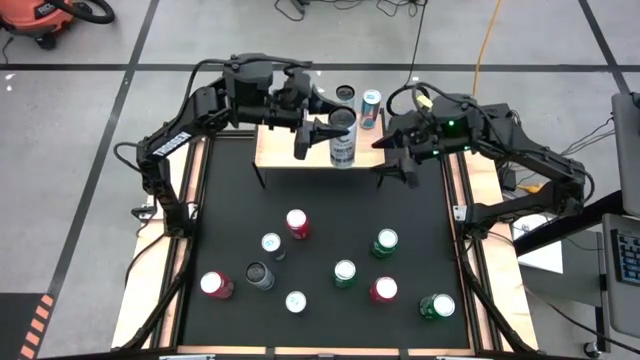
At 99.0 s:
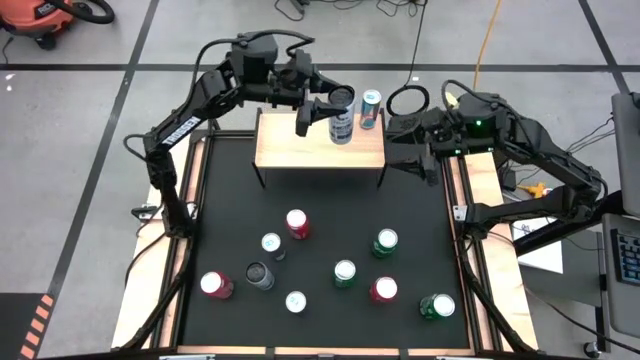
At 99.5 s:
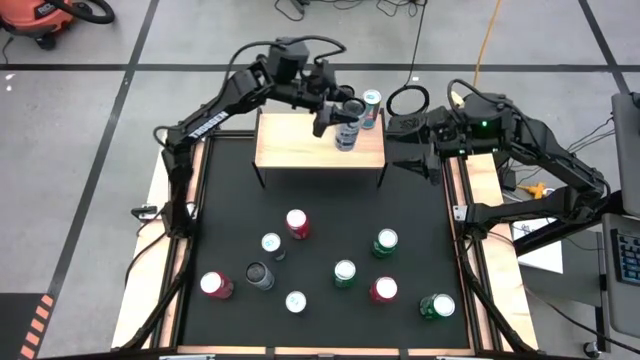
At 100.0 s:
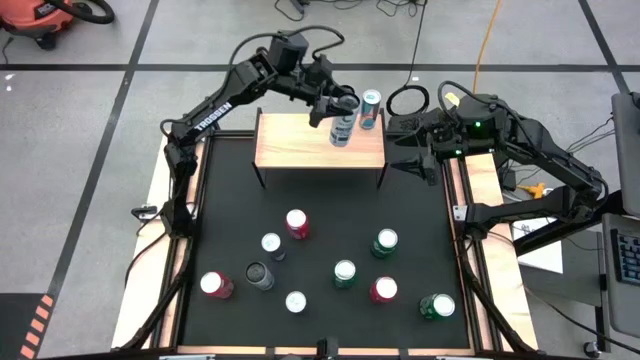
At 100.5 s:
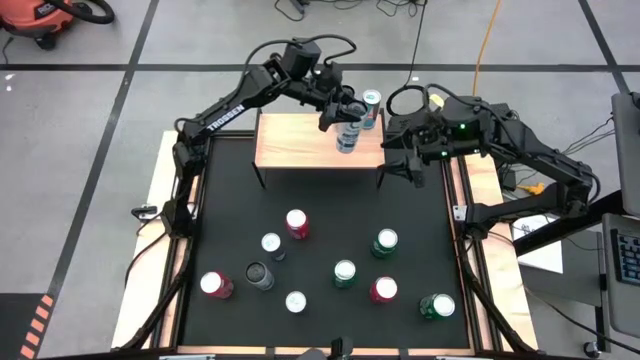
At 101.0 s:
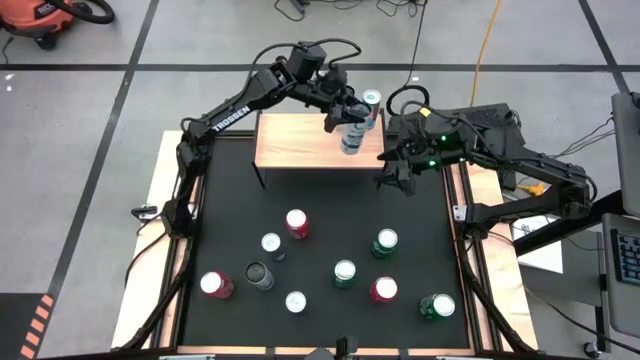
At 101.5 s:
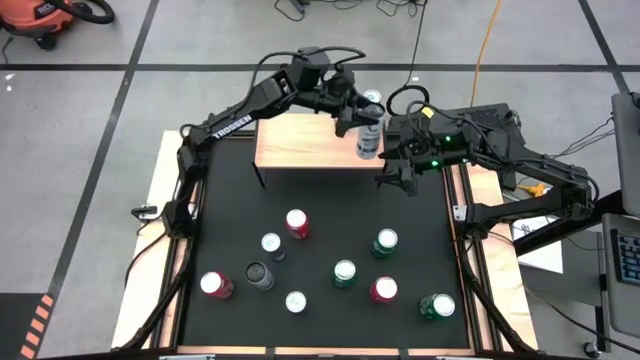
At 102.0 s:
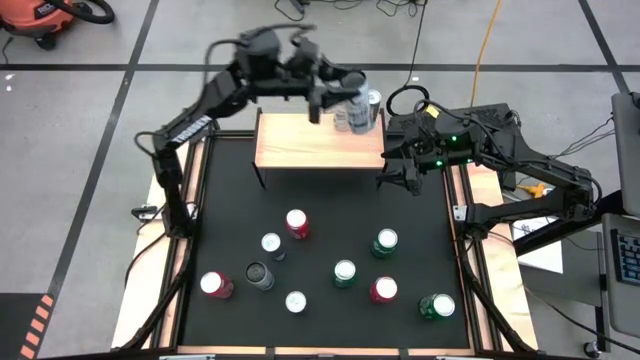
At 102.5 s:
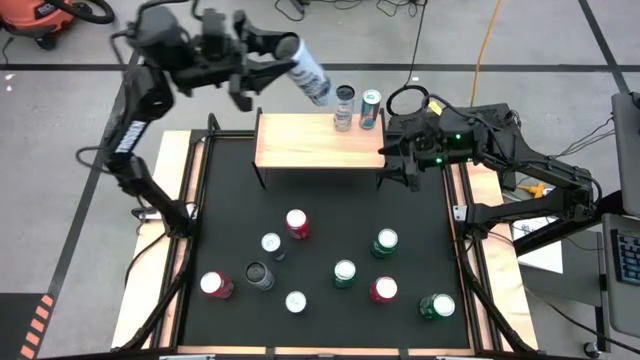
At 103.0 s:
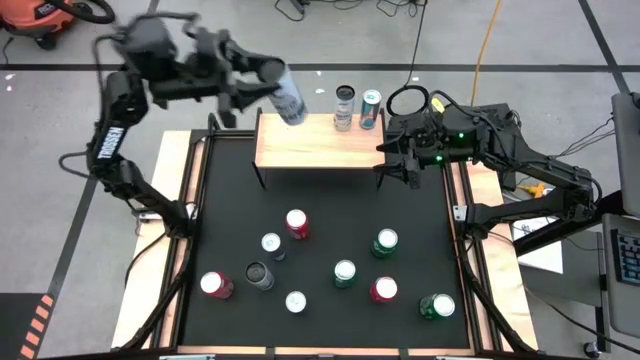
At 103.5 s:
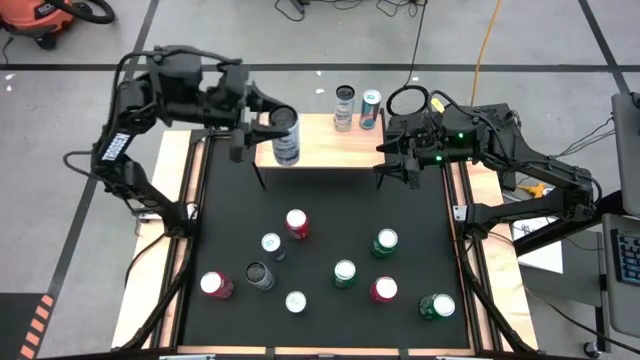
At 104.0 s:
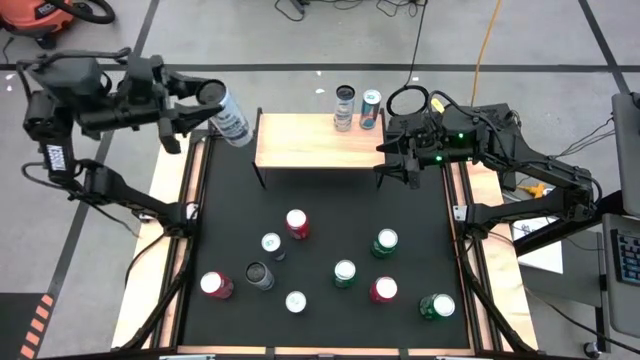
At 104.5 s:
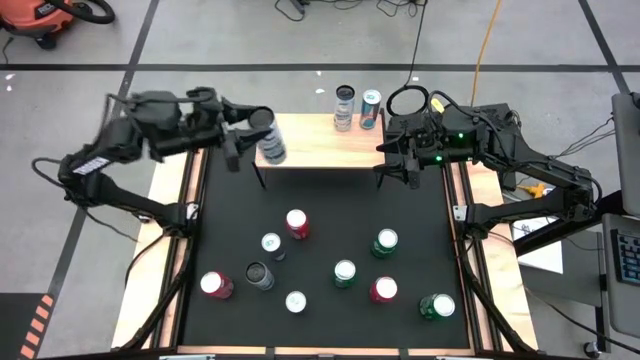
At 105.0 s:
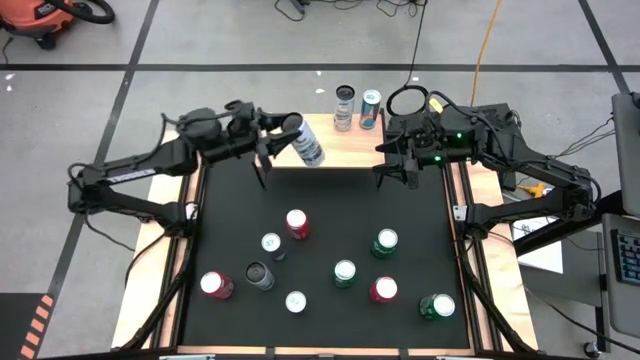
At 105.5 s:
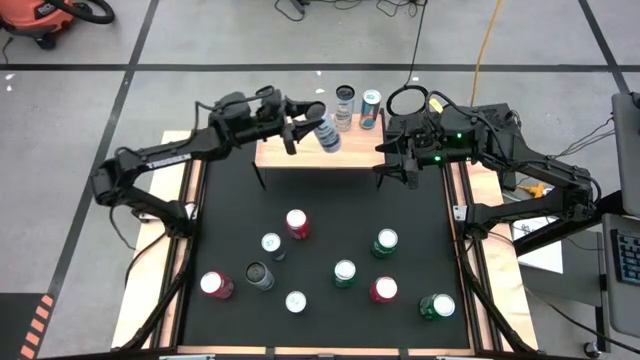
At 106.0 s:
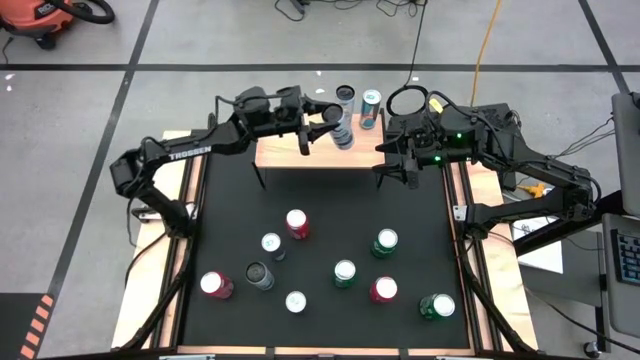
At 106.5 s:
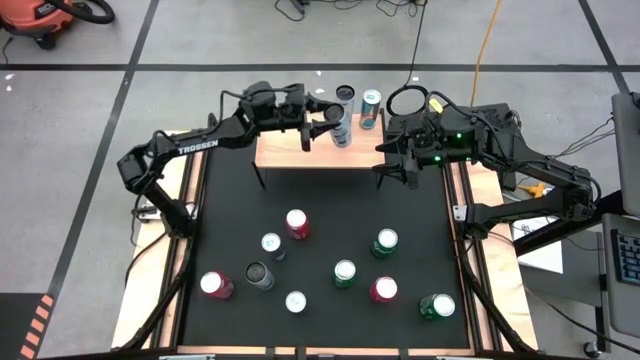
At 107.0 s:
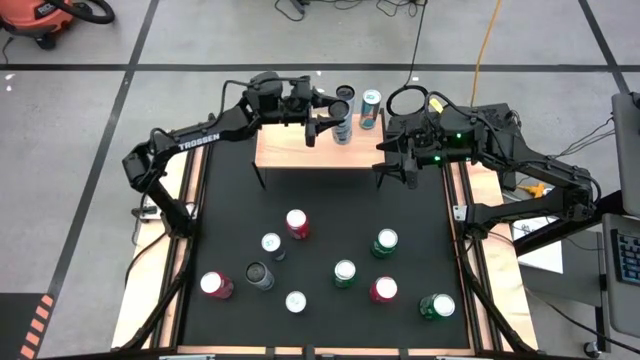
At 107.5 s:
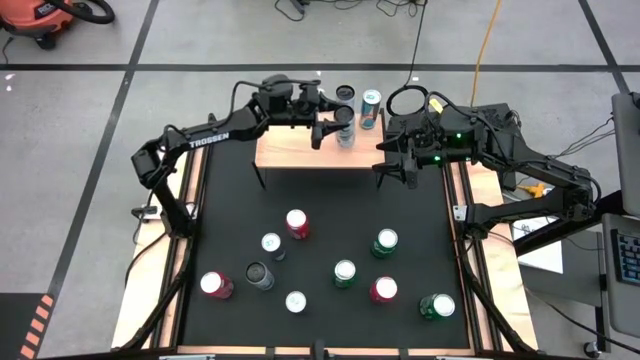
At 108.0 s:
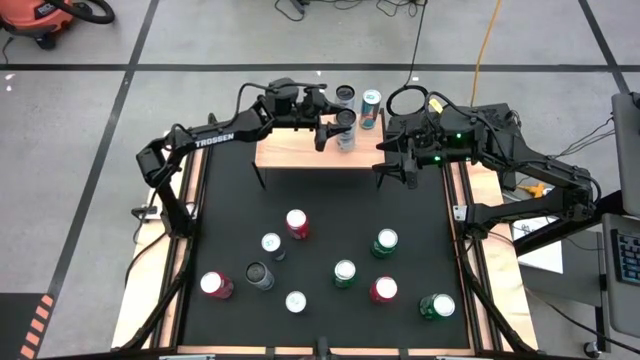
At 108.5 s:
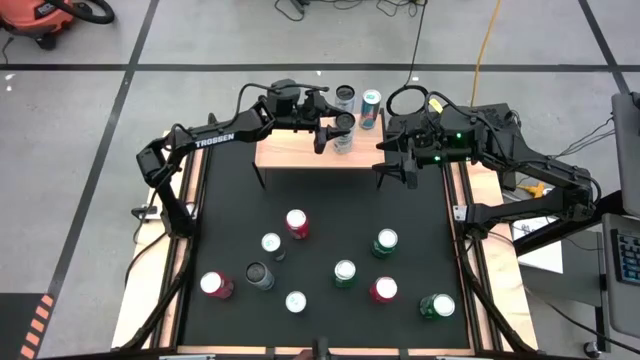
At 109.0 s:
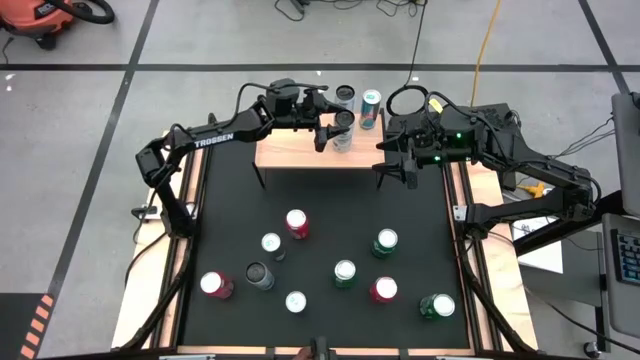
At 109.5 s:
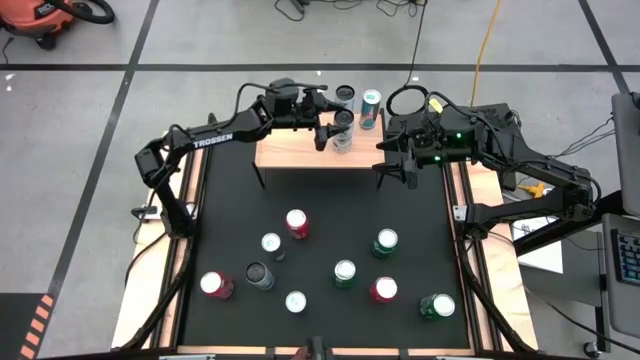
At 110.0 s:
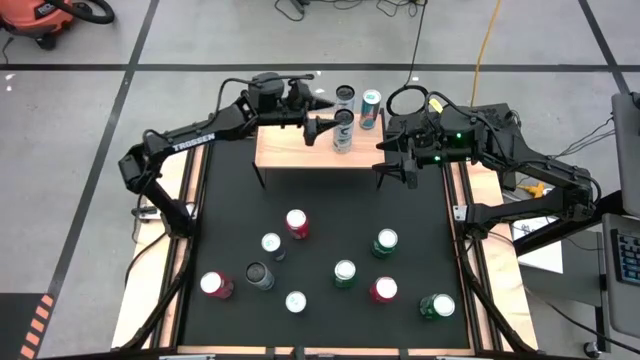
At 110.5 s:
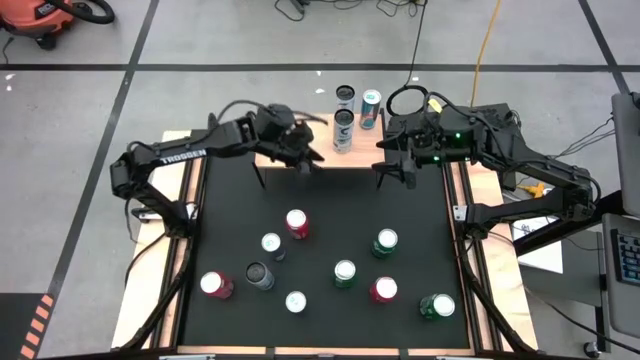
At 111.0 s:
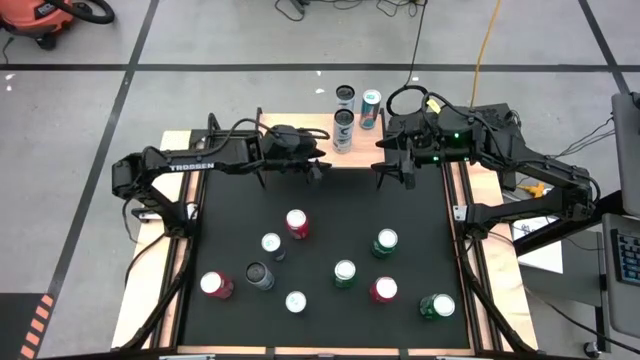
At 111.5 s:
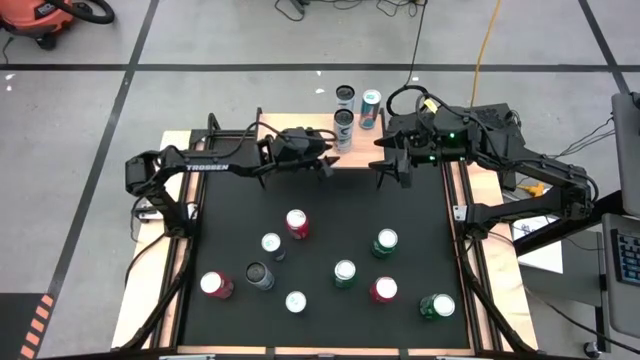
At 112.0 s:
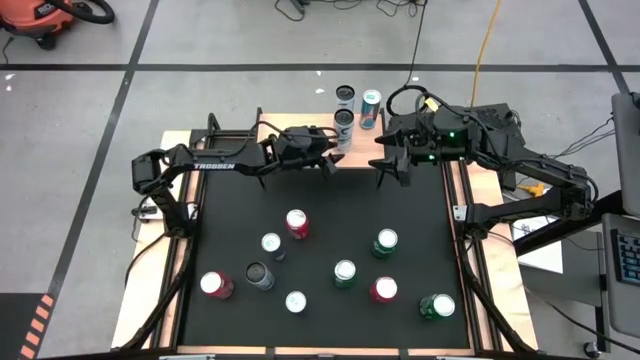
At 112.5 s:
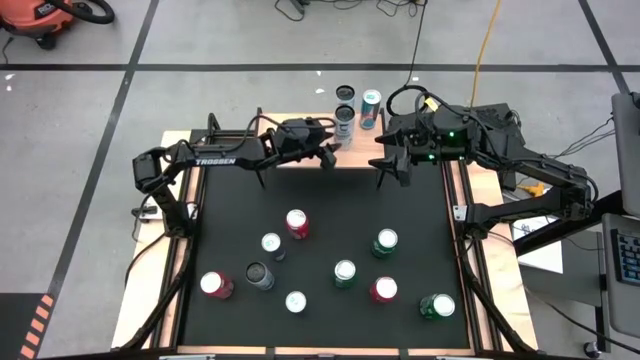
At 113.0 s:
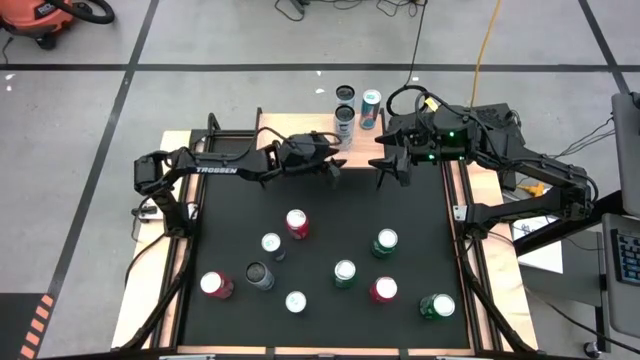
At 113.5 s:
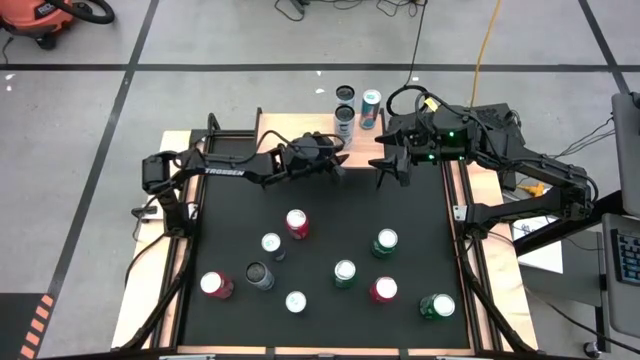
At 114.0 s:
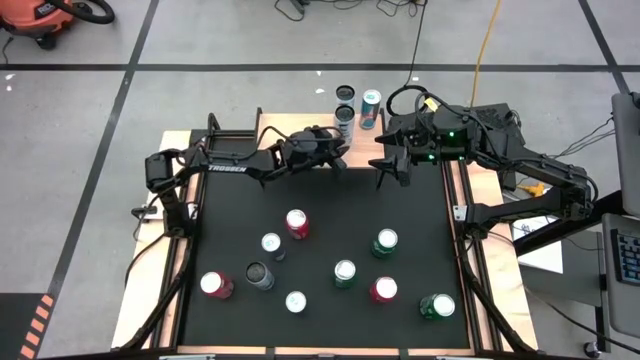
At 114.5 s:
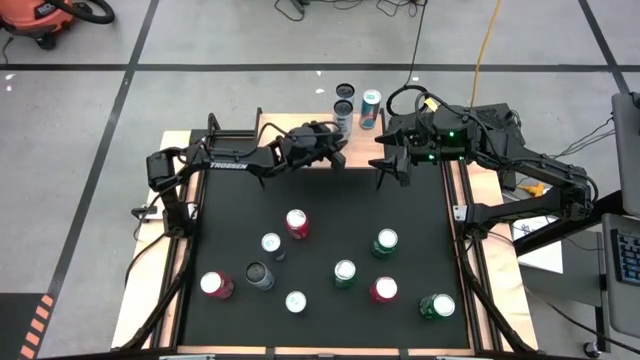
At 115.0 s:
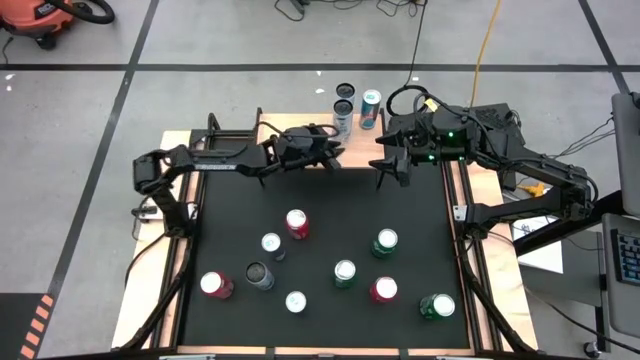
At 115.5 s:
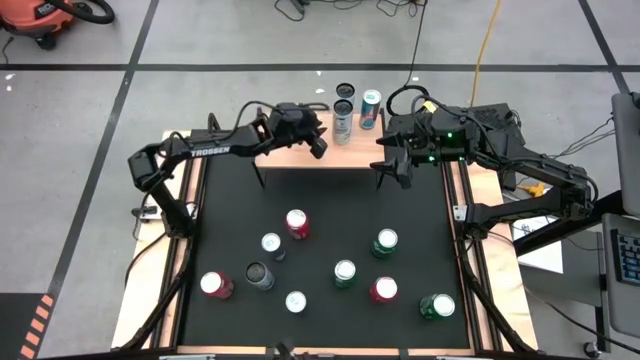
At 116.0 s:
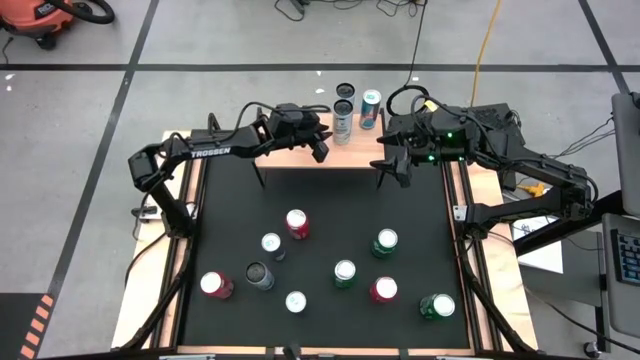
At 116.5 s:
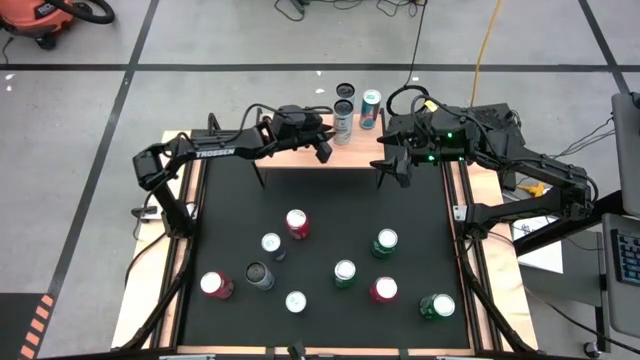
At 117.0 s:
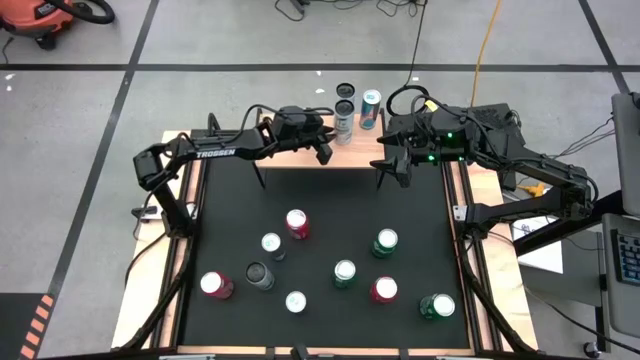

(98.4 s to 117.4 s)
Task: Place canned beverage on shelf
Put the right white soda can on the shelf aligned with the other white soda can

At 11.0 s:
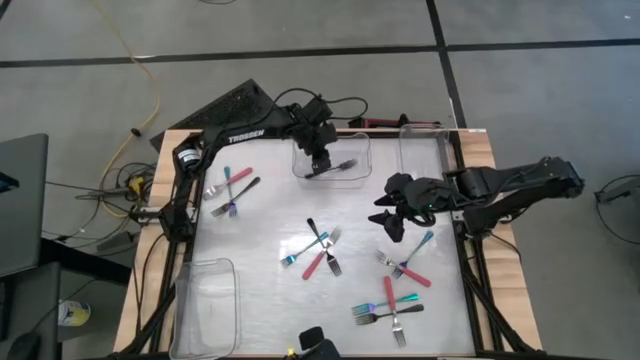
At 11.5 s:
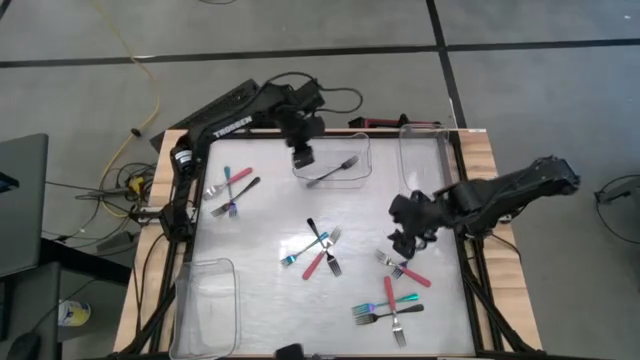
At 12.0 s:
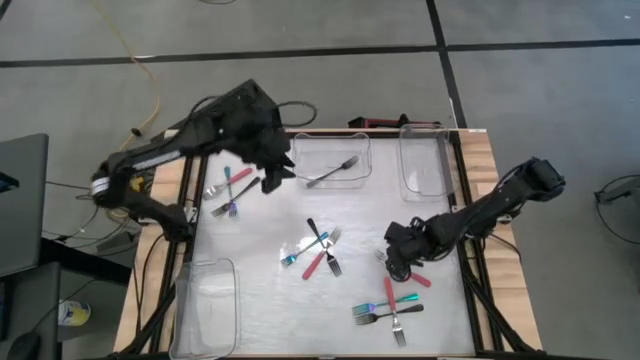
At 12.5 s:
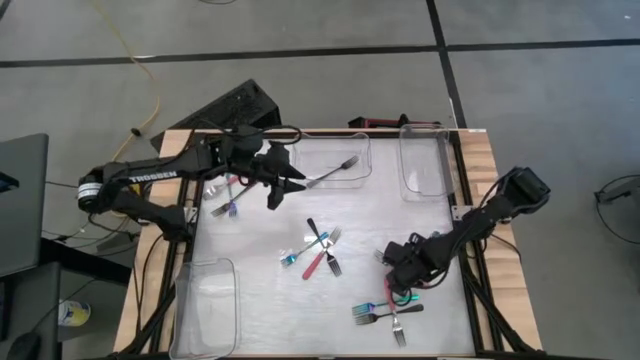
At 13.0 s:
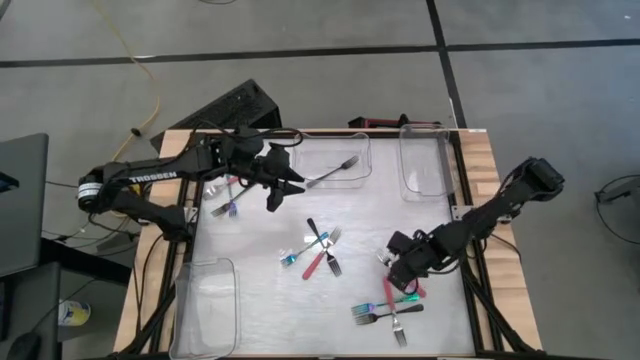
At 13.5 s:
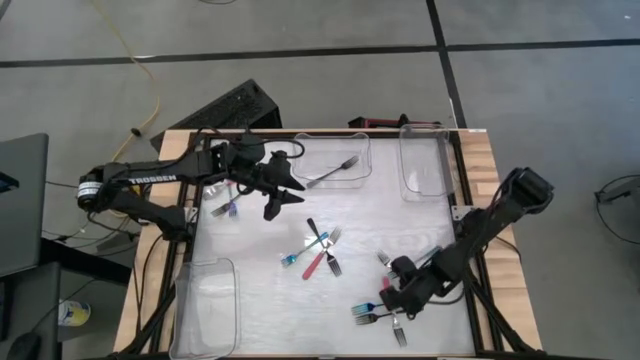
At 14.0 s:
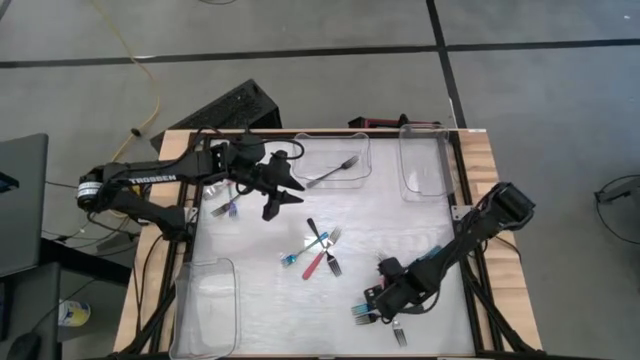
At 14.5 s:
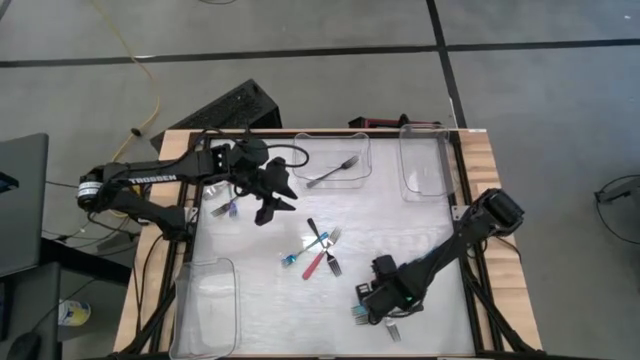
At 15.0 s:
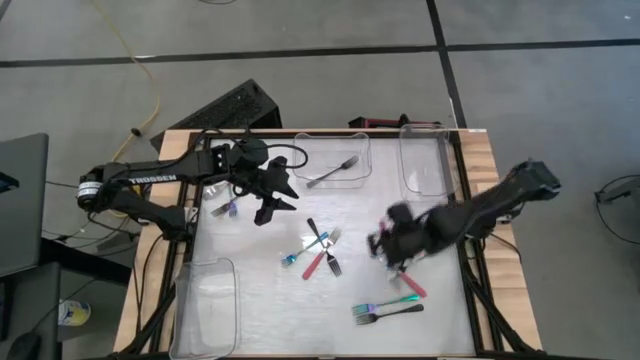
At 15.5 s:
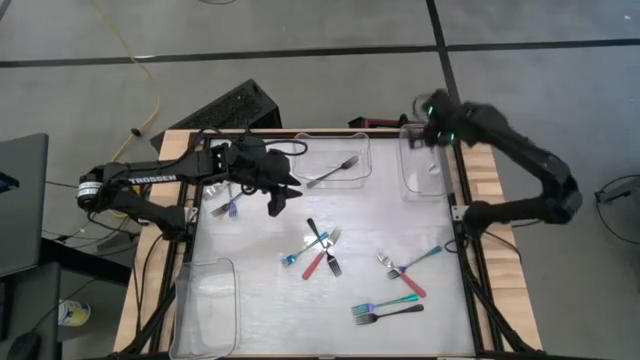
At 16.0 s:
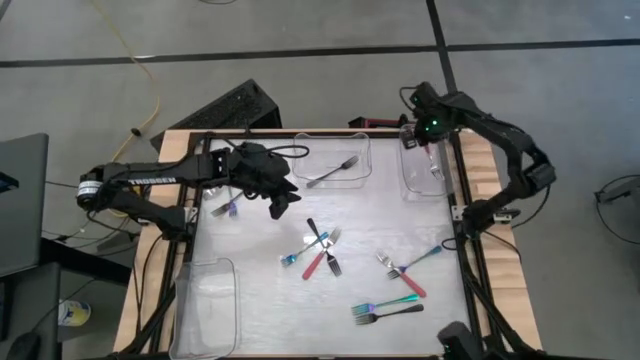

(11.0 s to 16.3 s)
Task: Sort silverware by color (type)
Put the bottom left pink fork into the top right transparent bin
